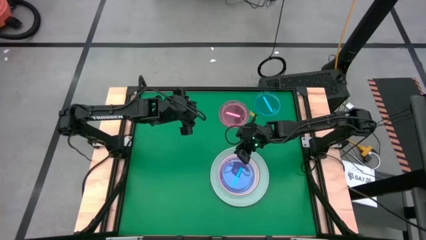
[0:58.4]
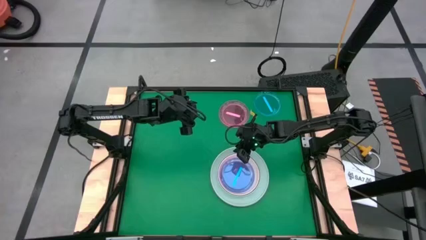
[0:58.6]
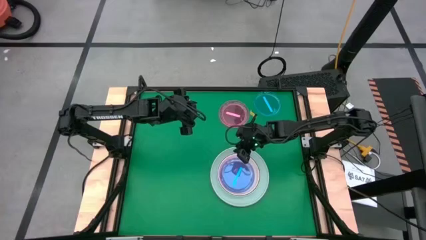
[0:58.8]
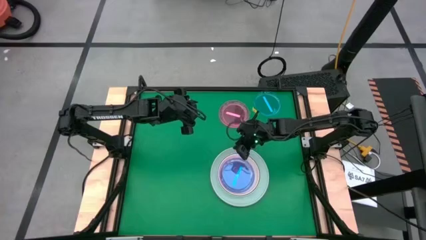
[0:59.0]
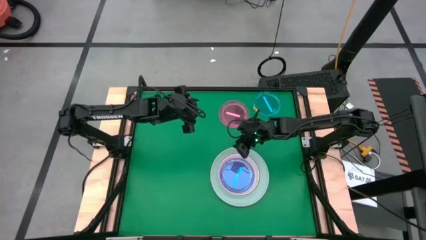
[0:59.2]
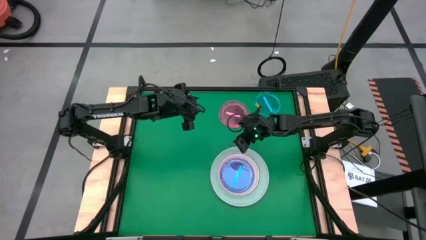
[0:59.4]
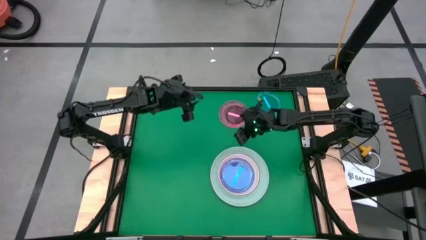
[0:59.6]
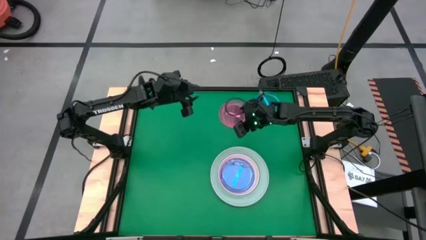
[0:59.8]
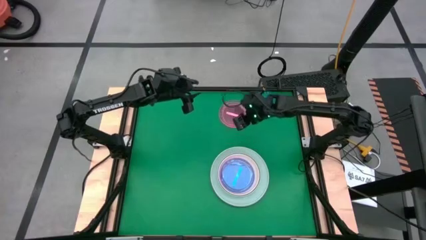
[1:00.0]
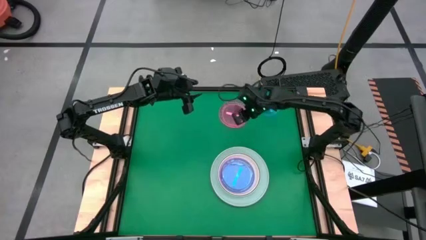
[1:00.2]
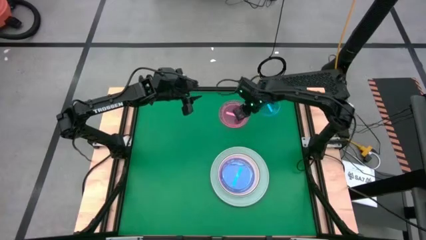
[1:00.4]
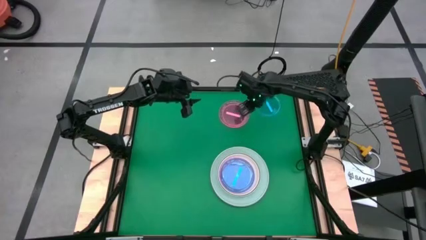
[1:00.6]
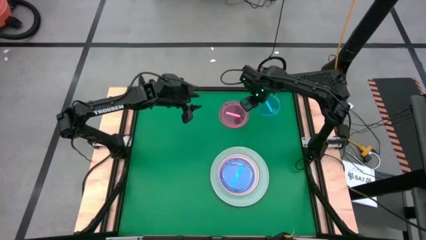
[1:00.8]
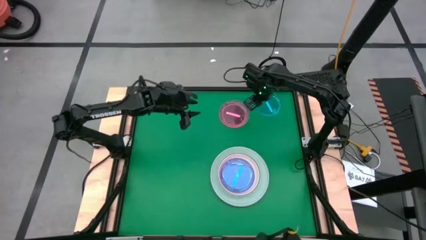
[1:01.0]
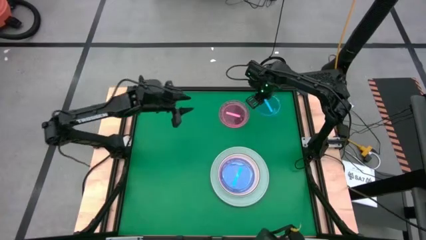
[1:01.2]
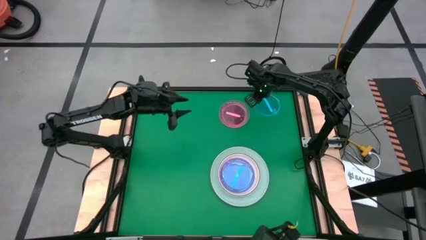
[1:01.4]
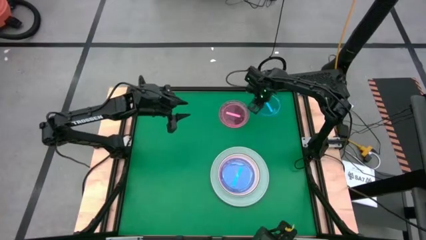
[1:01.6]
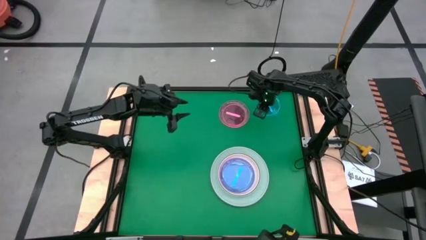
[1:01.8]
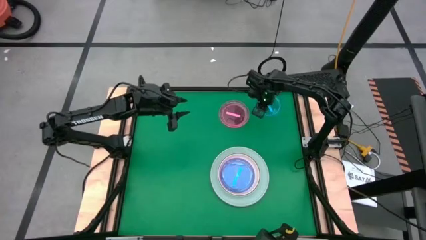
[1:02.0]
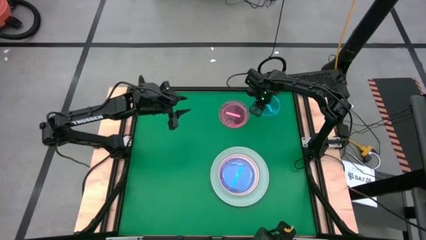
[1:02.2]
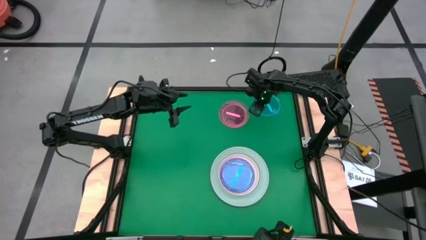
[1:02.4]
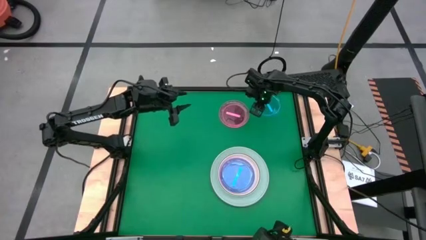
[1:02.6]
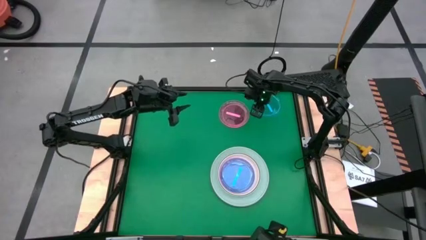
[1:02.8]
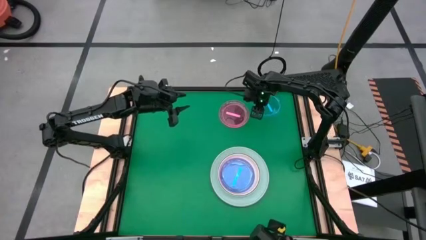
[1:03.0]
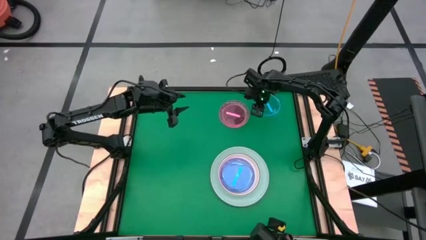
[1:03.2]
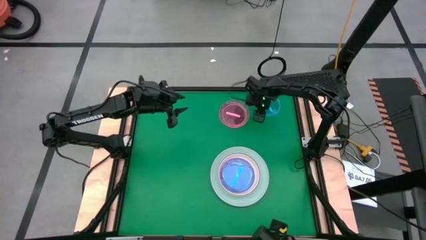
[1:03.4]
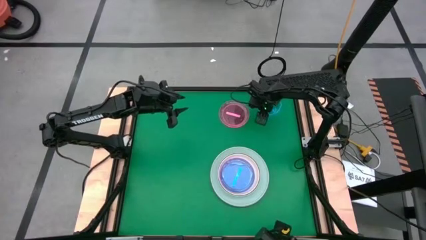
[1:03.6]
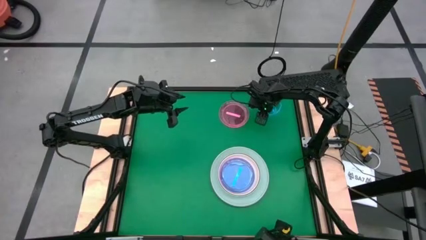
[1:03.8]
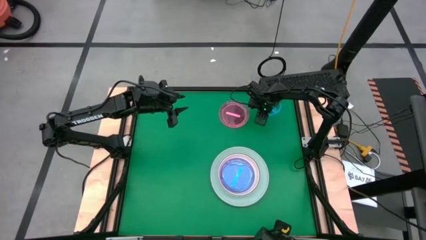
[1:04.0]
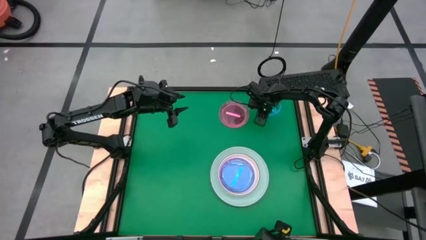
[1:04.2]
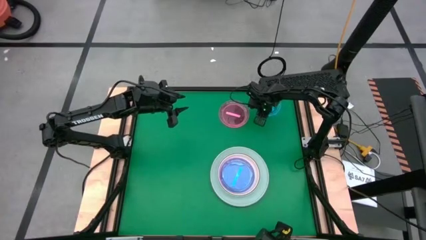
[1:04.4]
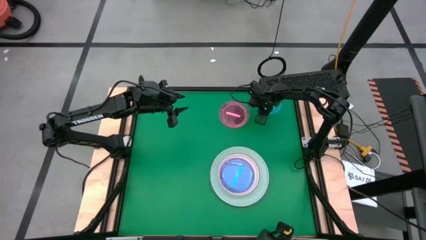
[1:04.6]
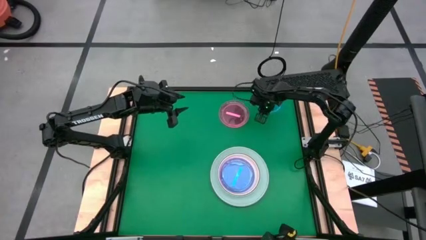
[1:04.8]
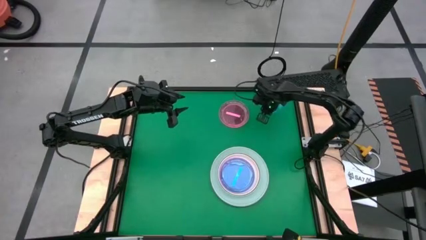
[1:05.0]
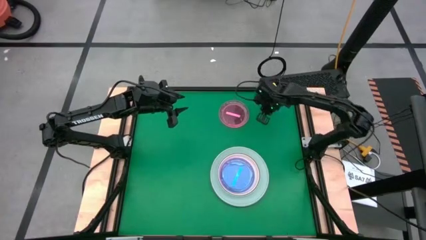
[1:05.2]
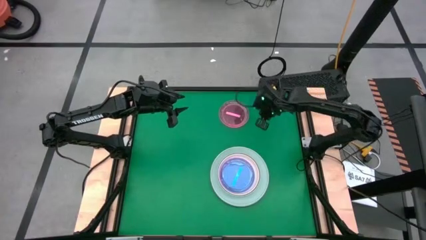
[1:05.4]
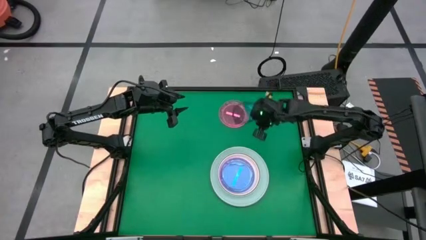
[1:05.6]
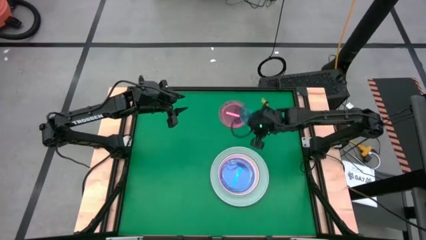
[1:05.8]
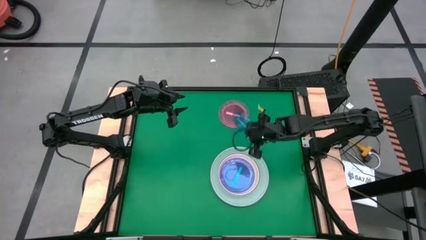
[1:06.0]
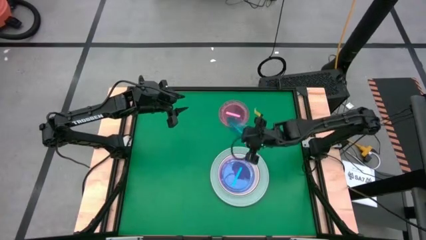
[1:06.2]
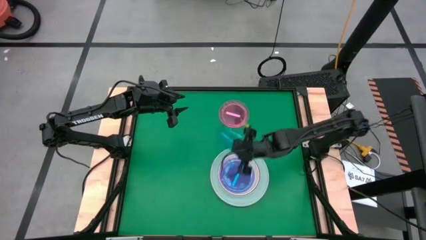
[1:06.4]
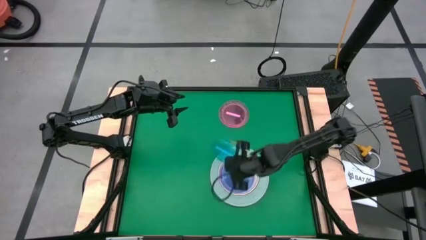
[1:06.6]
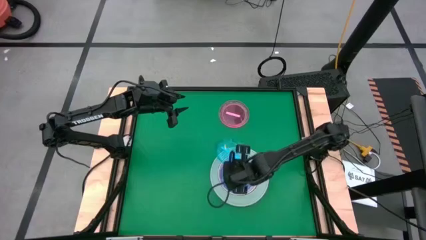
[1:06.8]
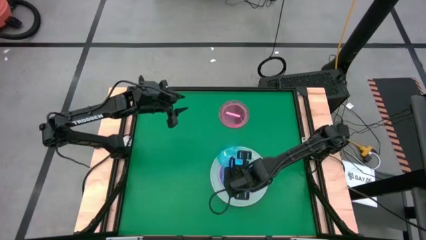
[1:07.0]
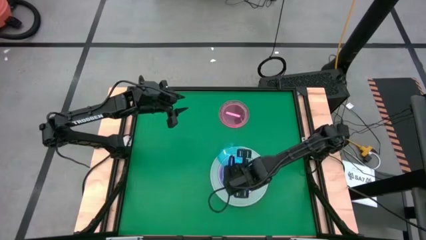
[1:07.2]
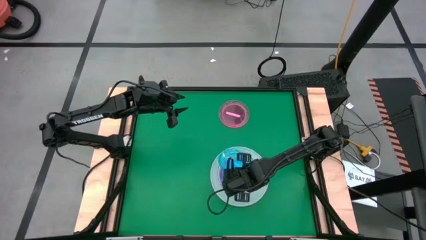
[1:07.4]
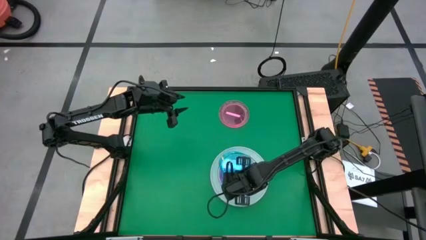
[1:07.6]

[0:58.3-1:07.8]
Task: Stack plastic plates
Stack the blue plate on top of the blue plate

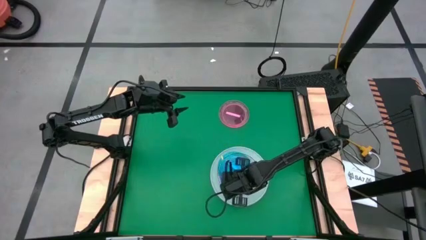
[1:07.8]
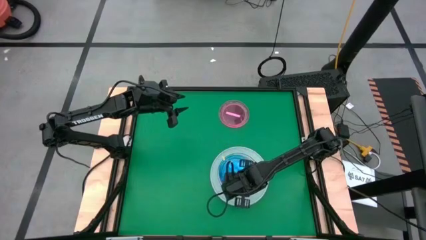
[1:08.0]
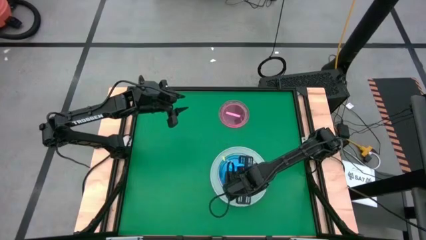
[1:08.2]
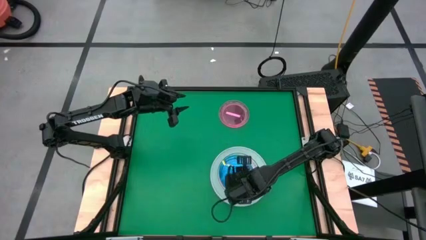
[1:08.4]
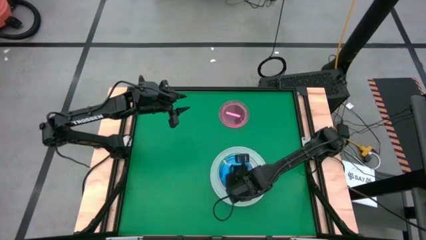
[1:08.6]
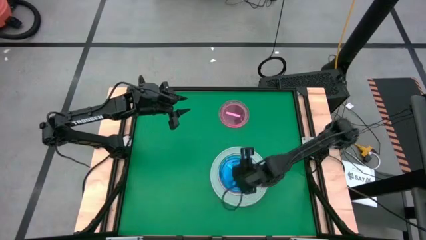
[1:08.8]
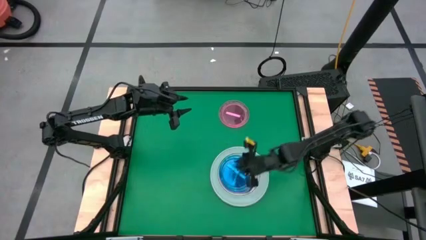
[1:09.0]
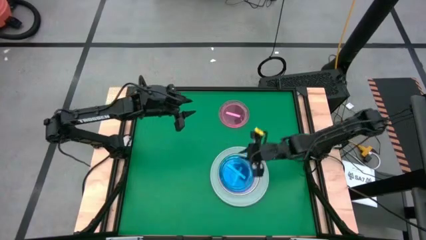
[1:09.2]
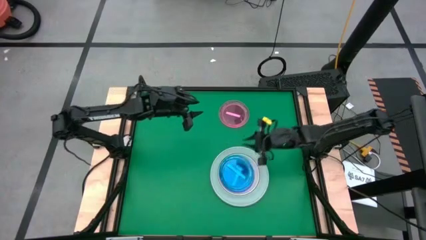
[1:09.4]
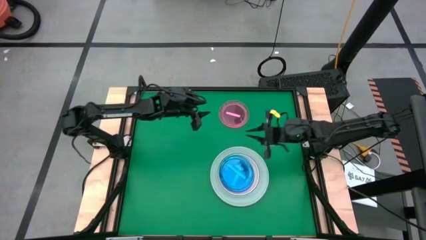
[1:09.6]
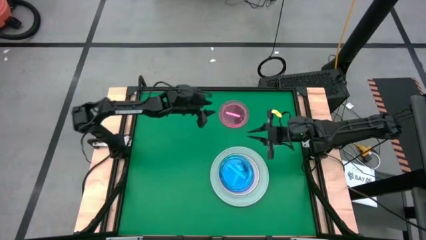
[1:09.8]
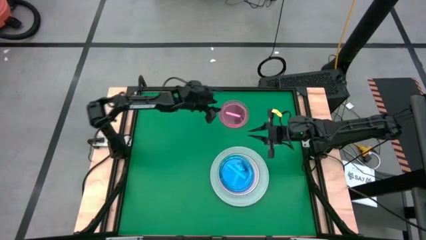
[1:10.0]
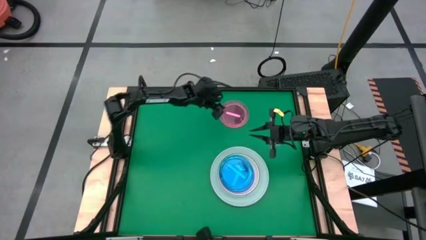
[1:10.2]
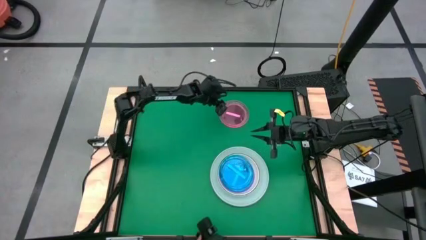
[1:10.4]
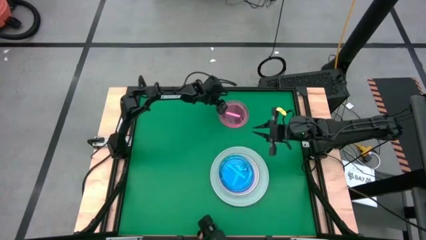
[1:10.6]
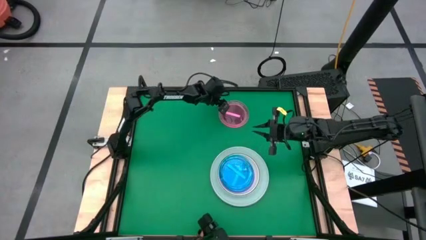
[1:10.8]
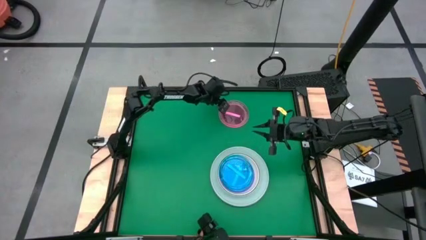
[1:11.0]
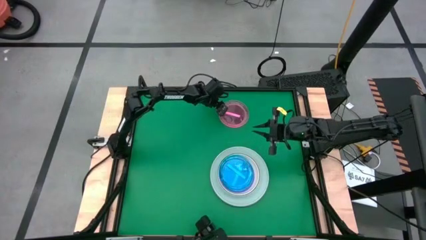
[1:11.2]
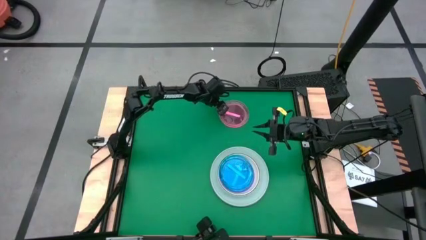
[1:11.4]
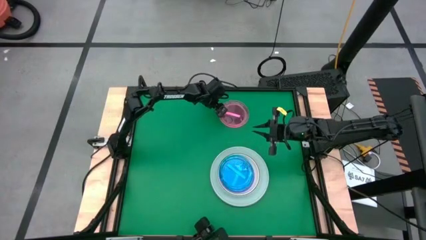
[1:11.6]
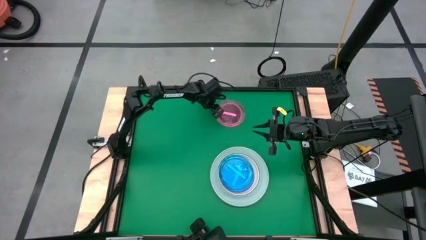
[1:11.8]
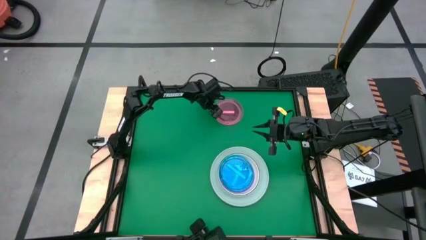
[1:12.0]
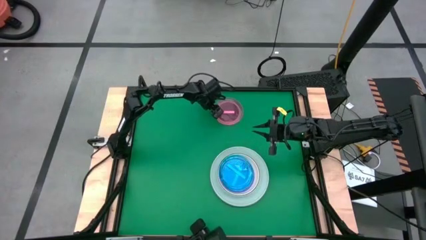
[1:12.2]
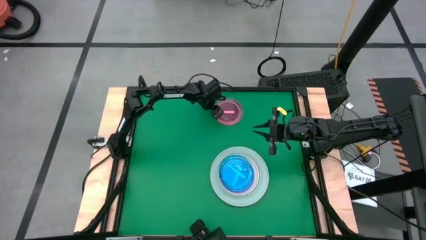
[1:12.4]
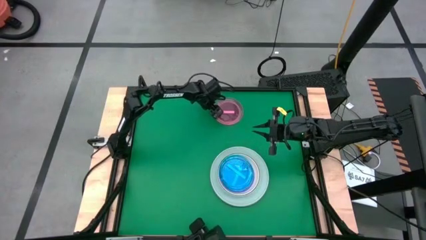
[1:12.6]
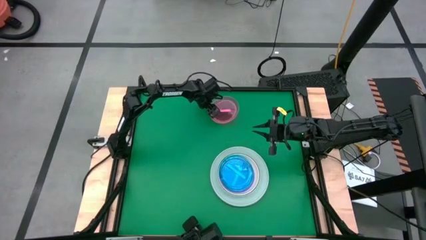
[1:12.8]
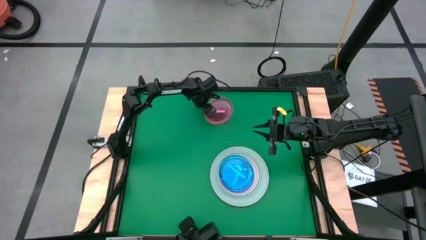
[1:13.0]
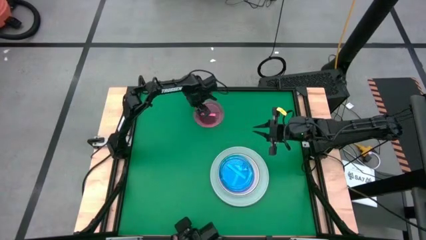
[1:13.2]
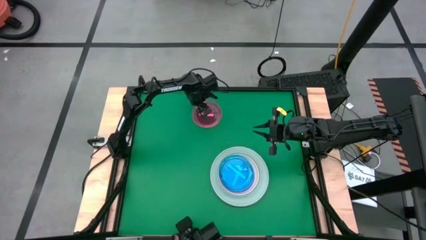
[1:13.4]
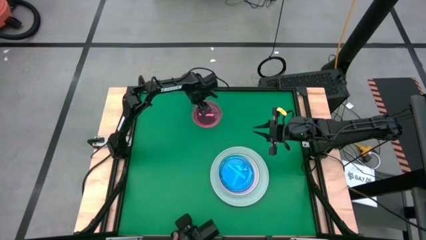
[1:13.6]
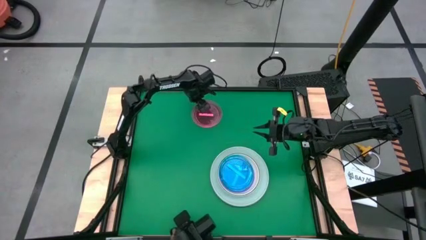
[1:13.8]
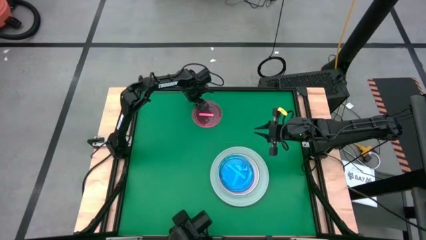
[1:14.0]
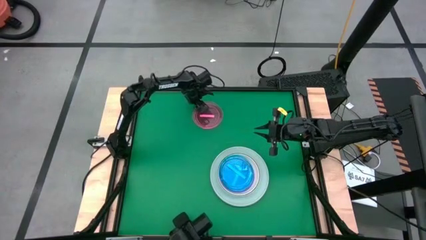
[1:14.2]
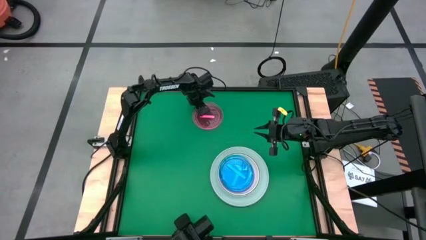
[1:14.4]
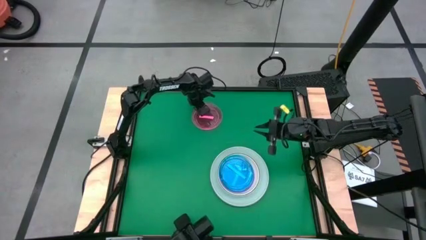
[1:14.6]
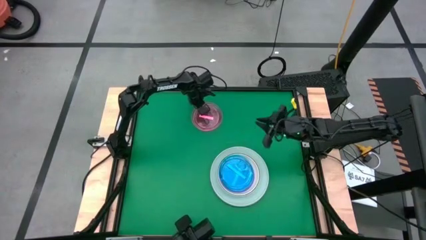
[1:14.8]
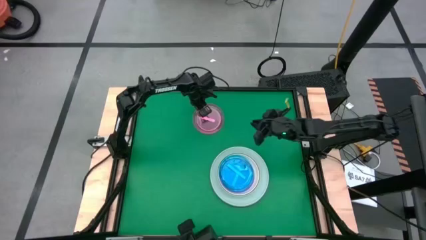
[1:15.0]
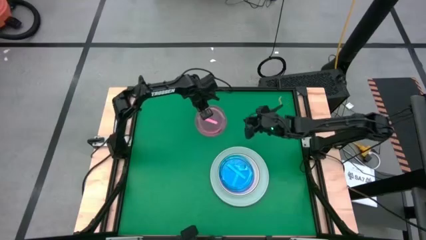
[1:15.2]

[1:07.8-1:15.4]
Stack the pink plate on top of the blue plate
